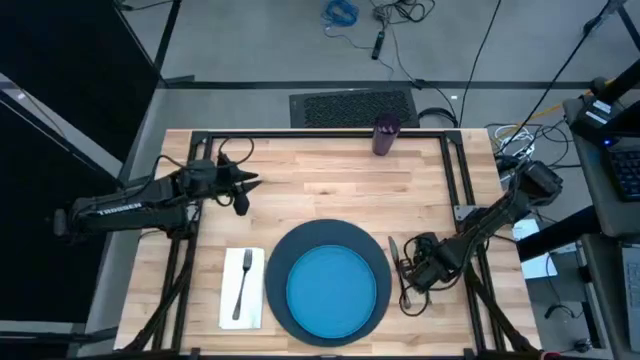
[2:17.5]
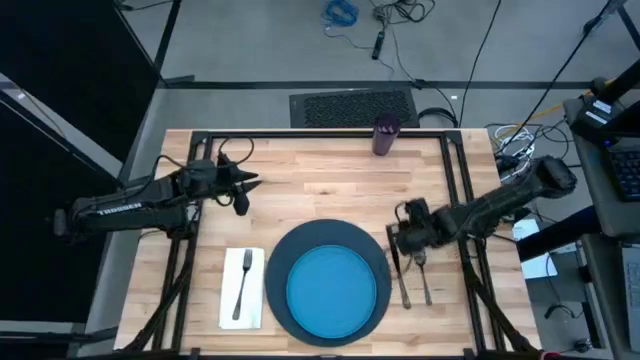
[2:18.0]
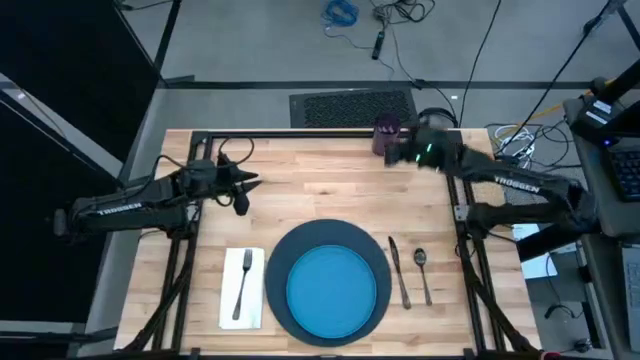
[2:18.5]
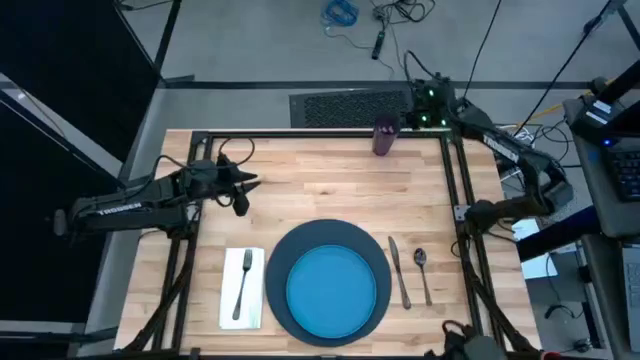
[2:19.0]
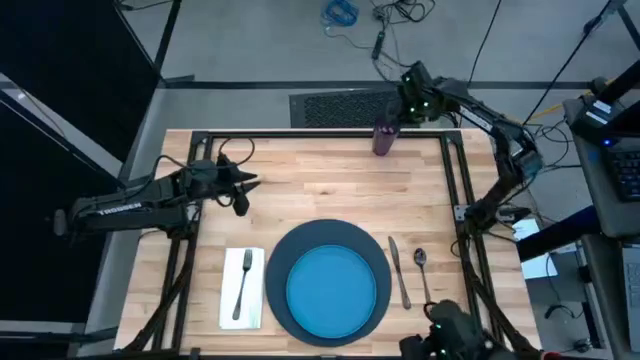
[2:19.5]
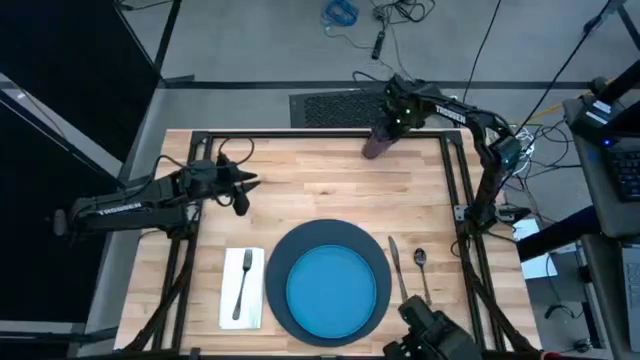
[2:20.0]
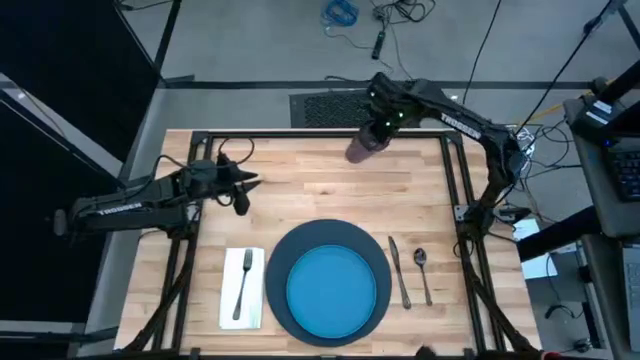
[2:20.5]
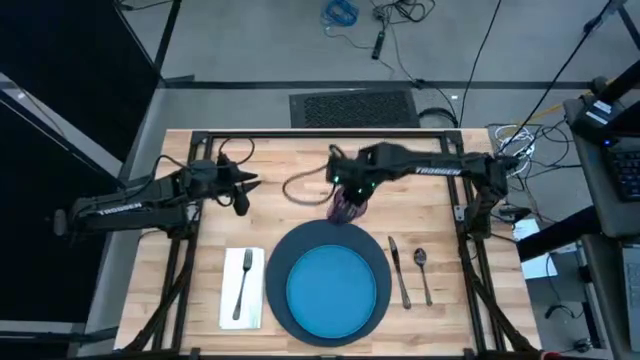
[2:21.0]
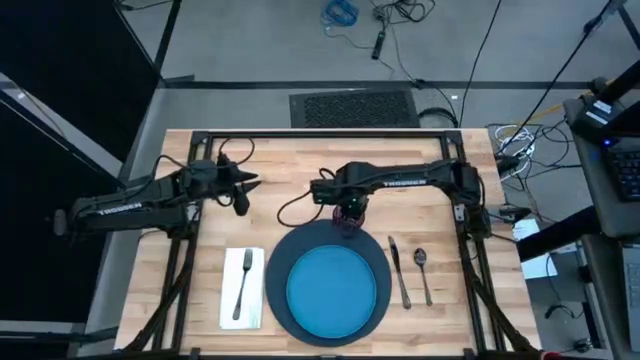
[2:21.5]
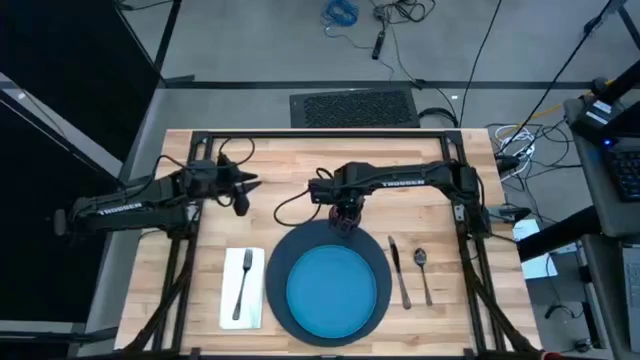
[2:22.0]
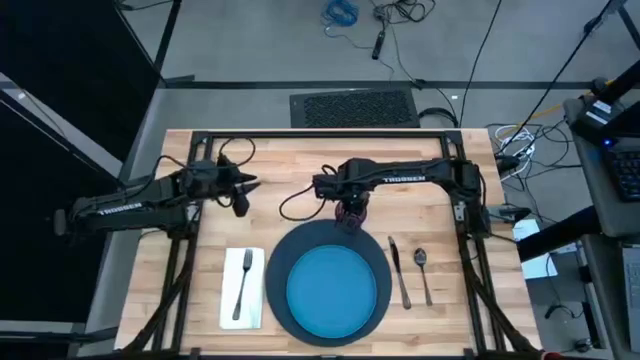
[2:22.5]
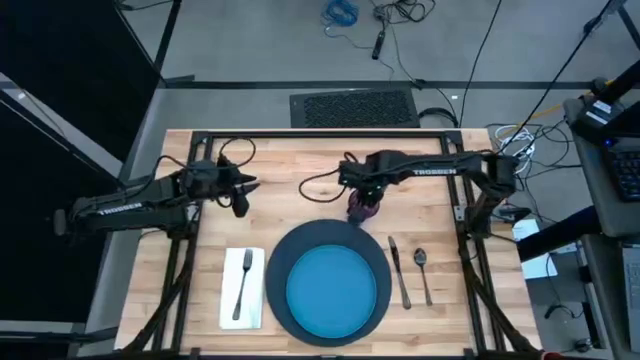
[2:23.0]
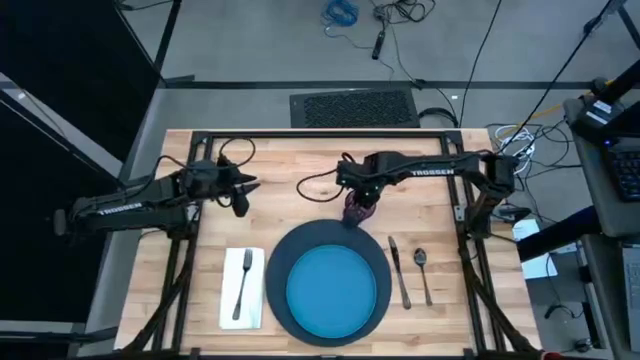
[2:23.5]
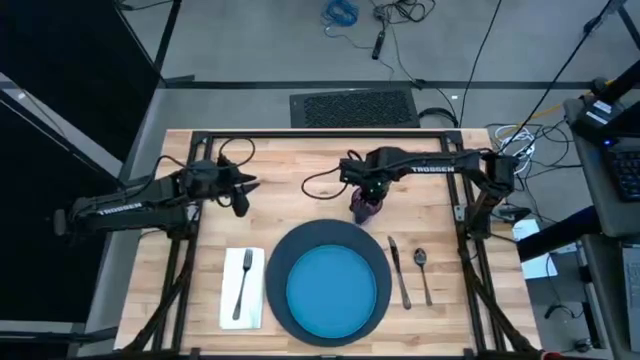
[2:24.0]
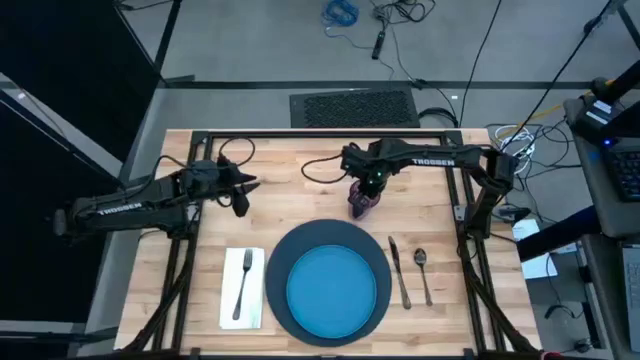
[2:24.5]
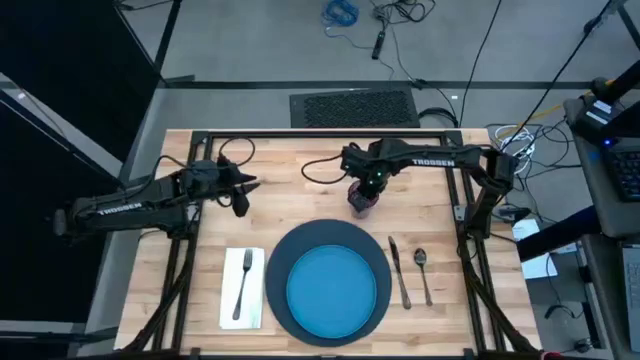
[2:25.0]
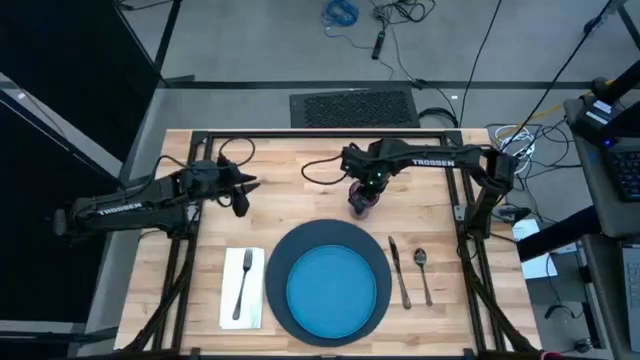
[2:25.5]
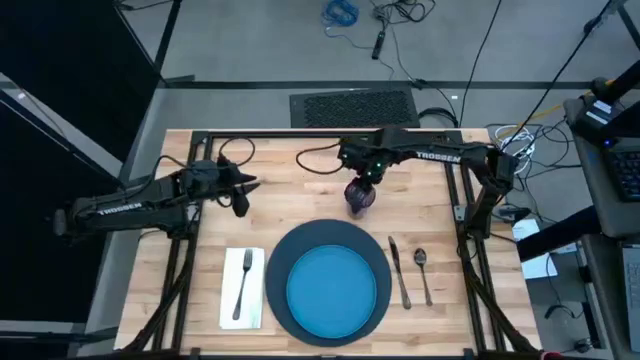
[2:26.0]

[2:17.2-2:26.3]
Task: Set table place
Put the violet cup to the blue table mat on the table

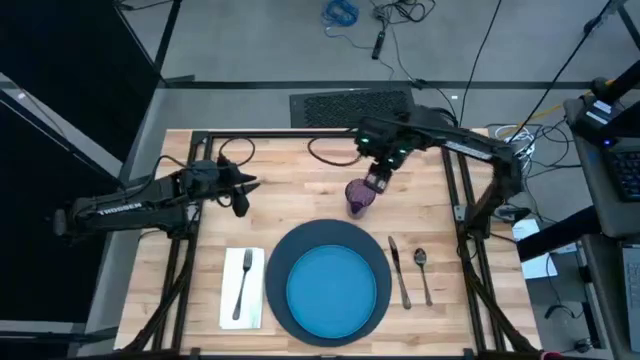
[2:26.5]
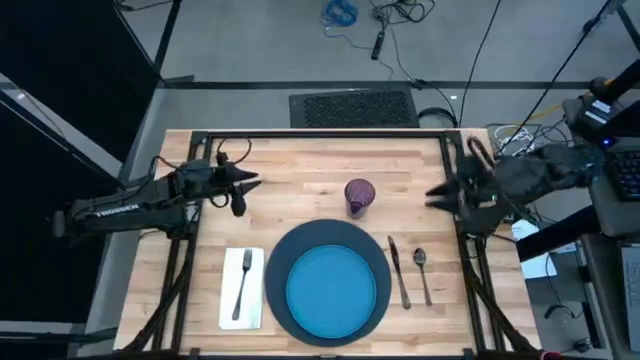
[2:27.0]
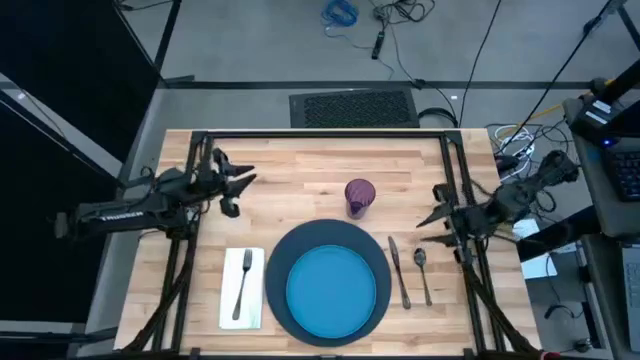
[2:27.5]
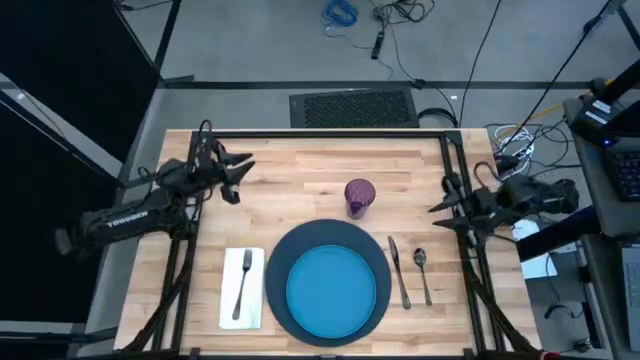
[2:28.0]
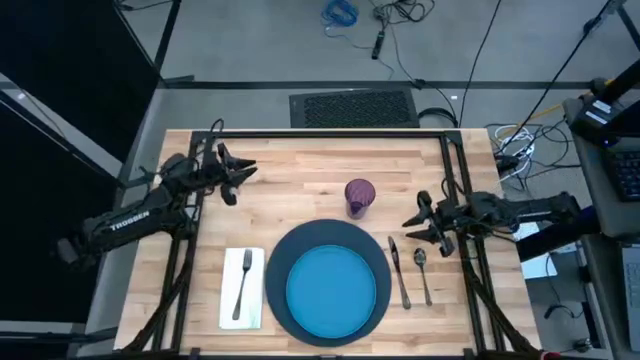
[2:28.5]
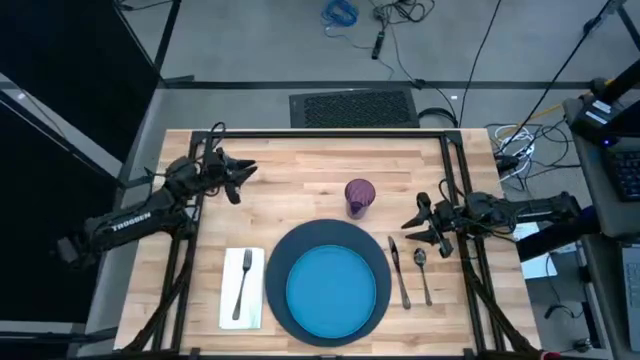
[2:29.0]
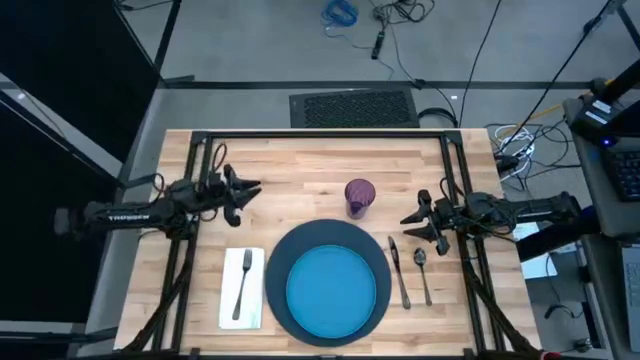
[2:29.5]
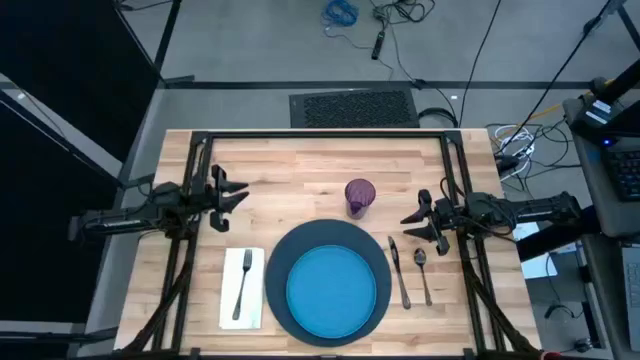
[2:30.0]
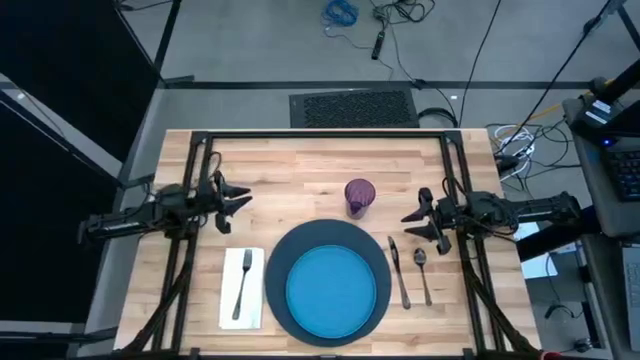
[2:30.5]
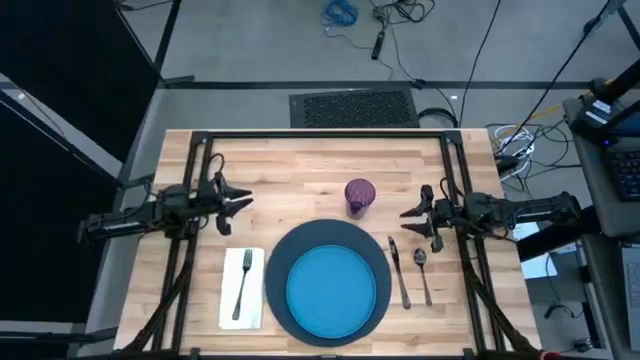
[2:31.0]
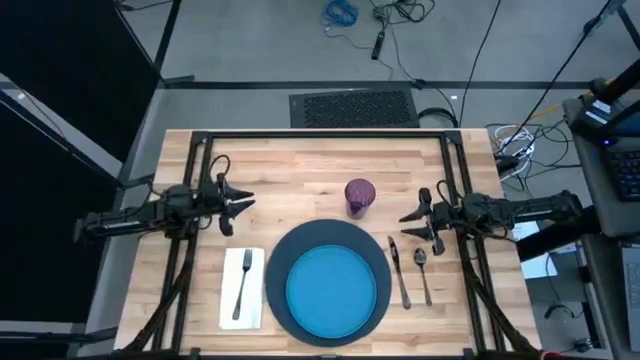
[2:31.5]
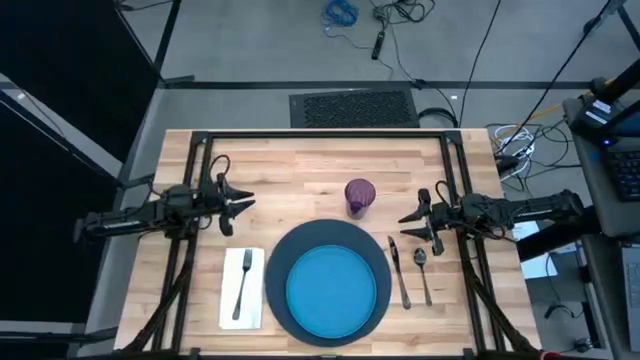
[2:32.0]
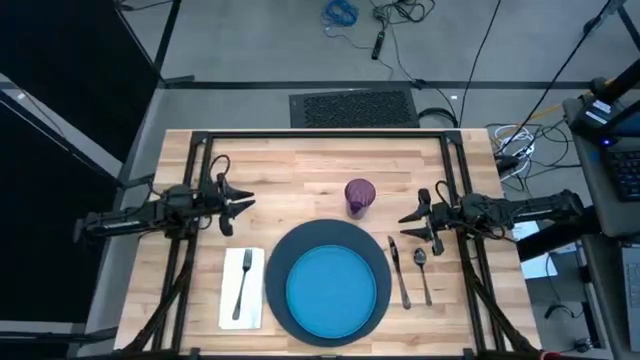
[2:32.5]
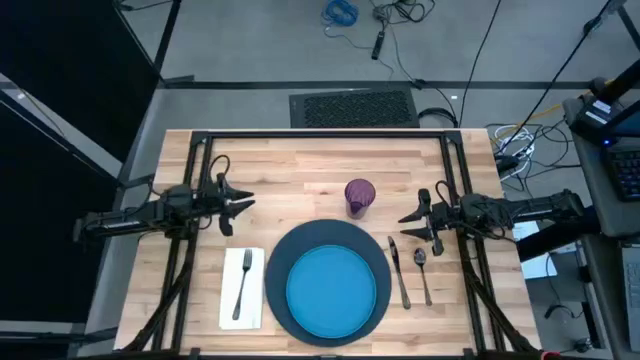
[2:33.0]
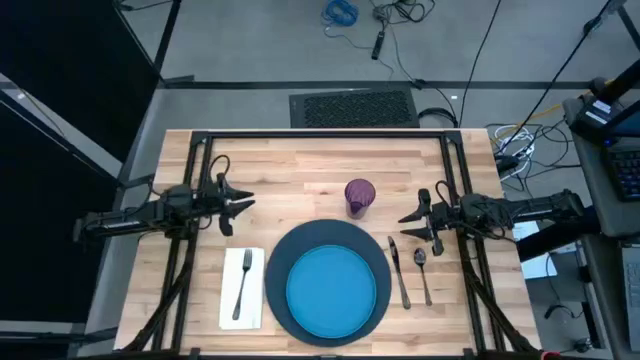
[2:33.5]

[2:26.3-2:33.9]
Return to Home Position

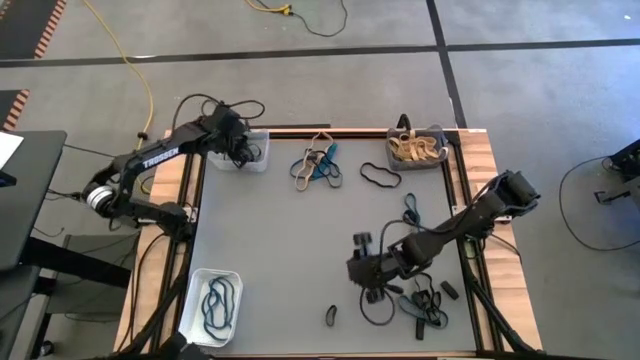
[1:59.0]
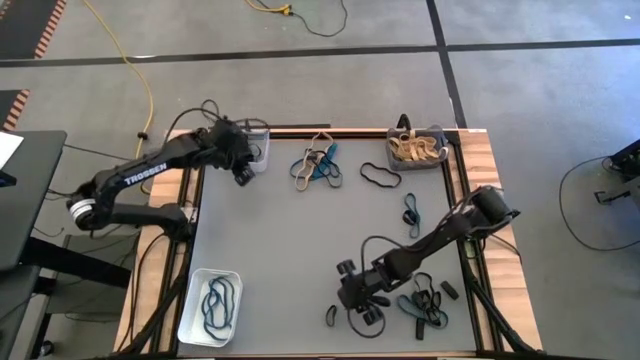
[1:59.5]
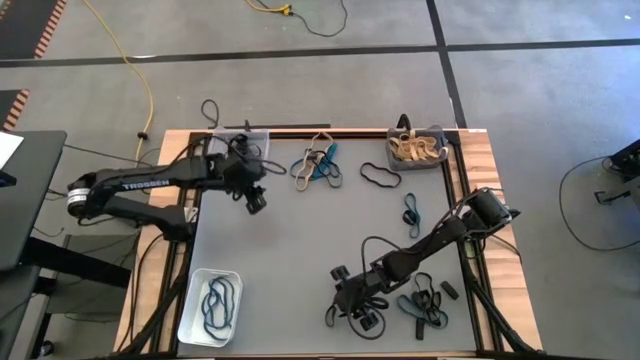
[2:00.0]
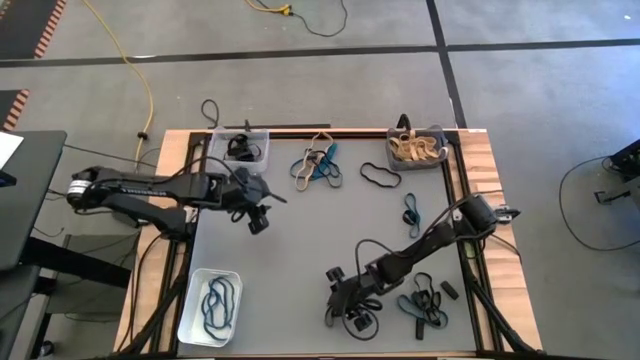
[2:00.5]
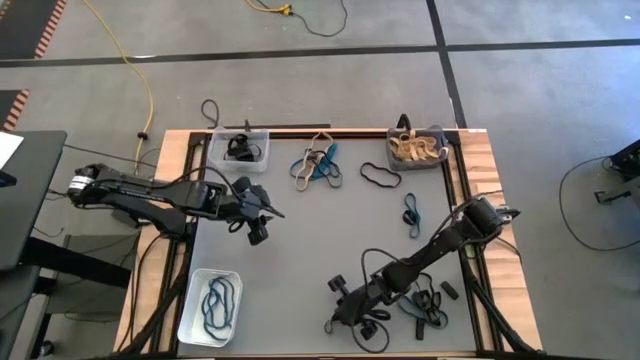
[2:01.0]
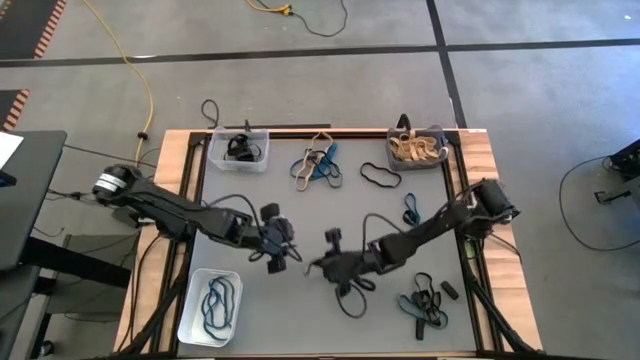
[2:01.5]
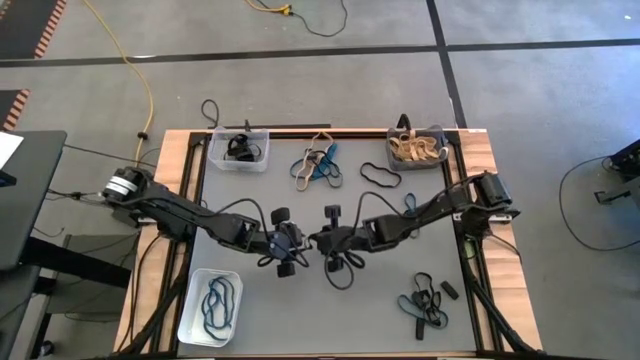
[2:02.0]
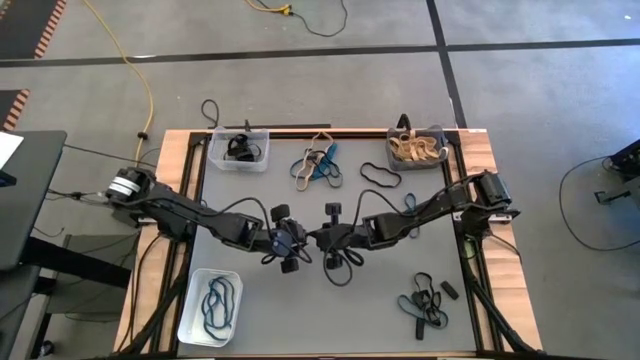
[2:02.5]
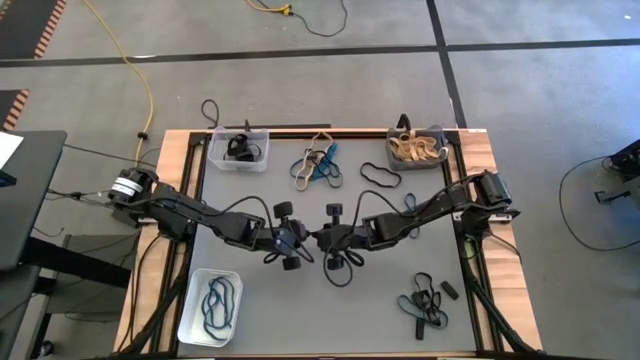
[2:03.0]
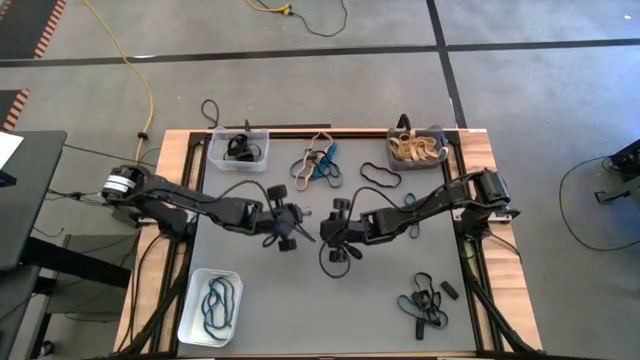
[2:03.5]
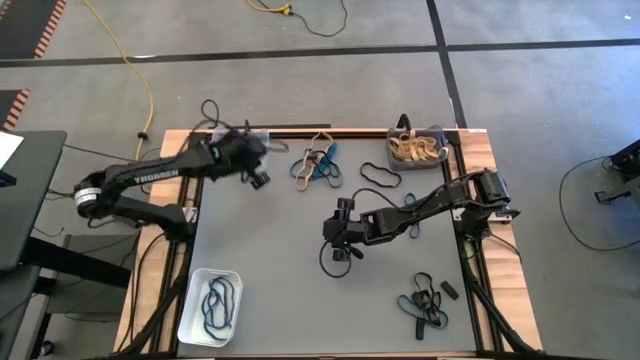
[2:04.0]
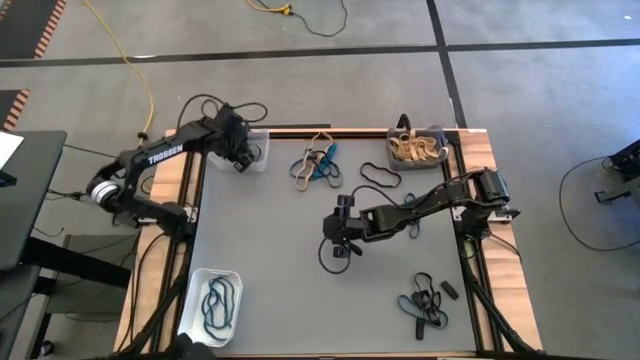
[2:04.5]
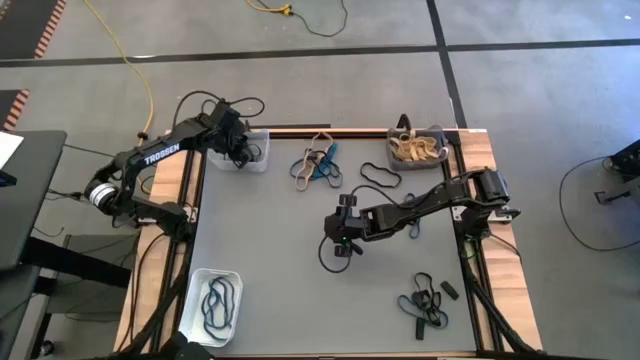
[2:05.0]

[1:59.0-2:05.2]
Task: Sort rubber bands into baskets
Put the black rubber band into the transparent bin
